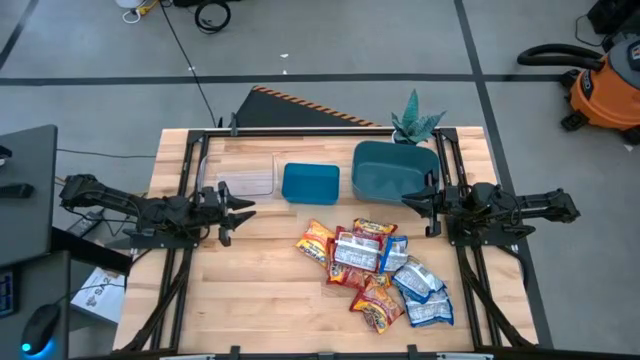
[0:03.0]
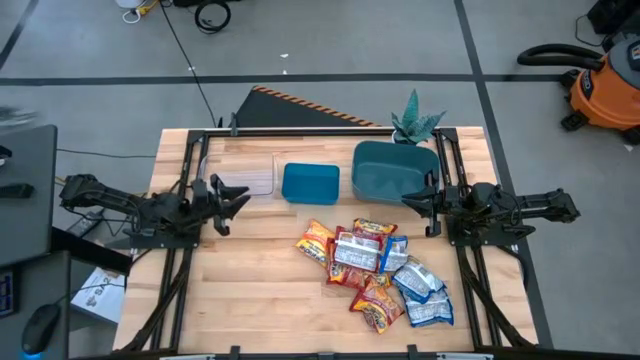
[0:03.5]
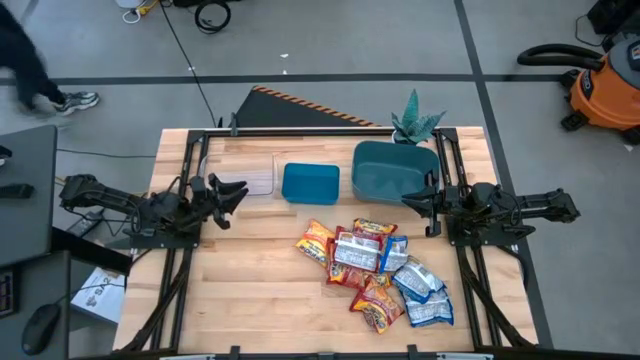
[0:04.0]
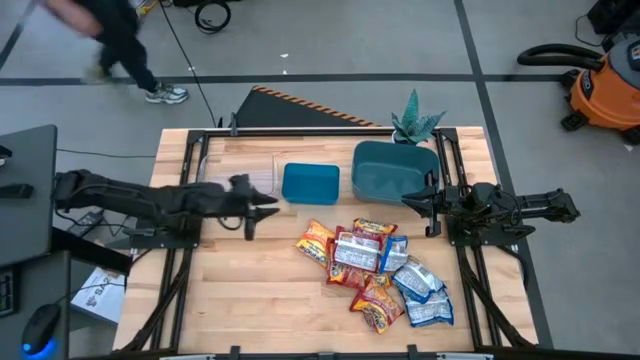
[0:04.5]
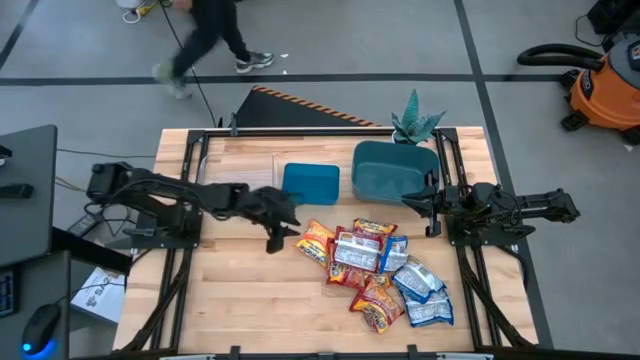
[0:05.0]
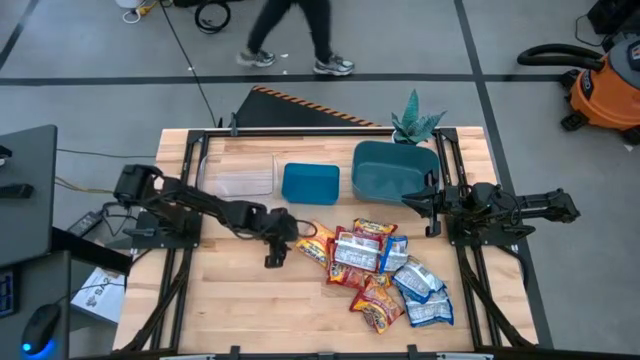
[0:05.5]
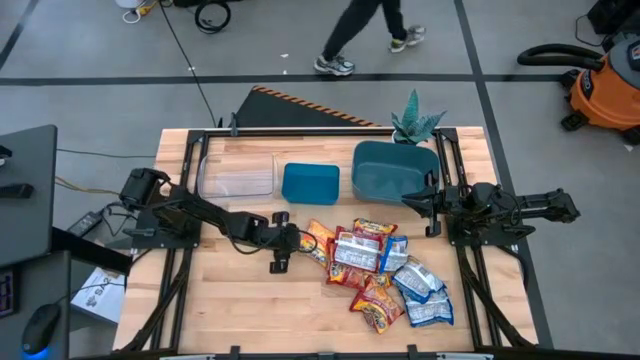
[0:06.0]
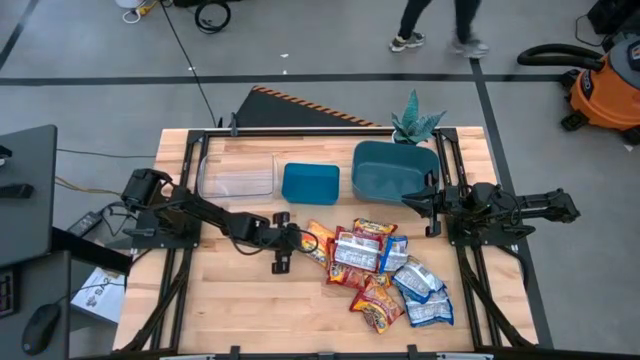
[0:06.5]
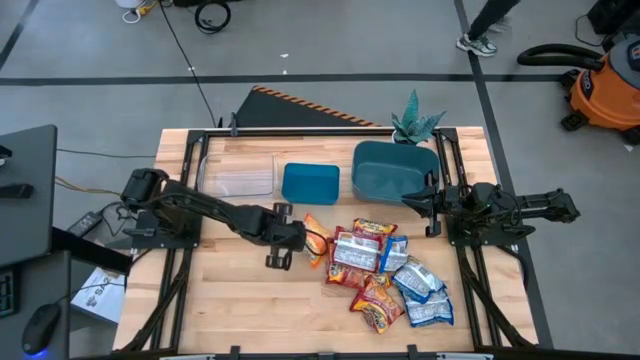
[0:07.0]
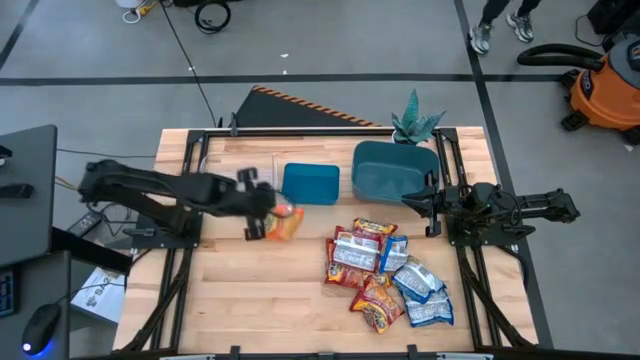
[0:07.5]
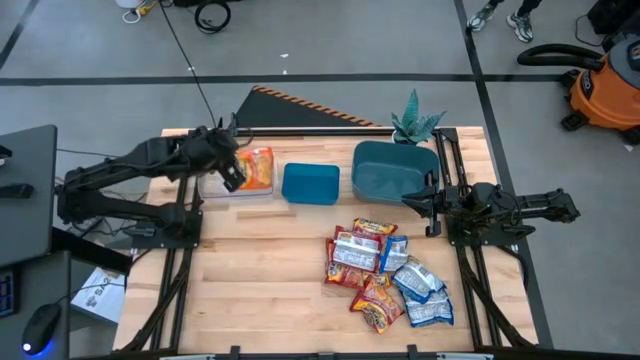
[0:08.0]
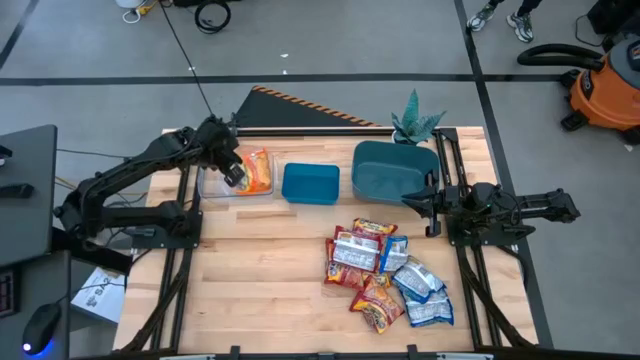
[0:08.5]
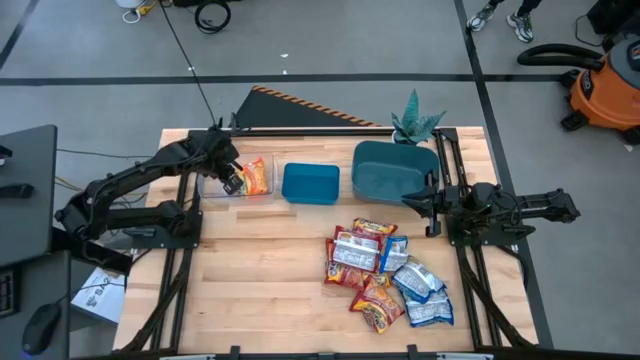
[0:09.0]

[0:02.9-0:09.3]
Task: Sort Maruchan noodles
Put the orange noodle pack into the transparent bin

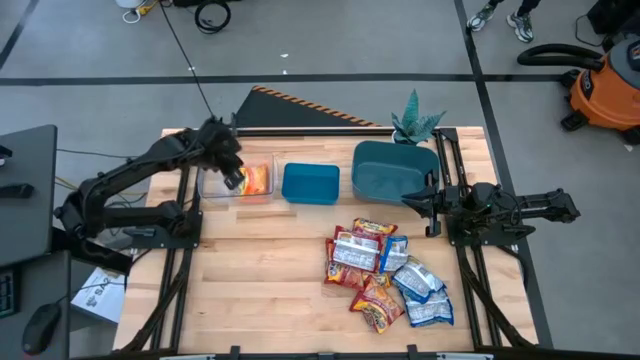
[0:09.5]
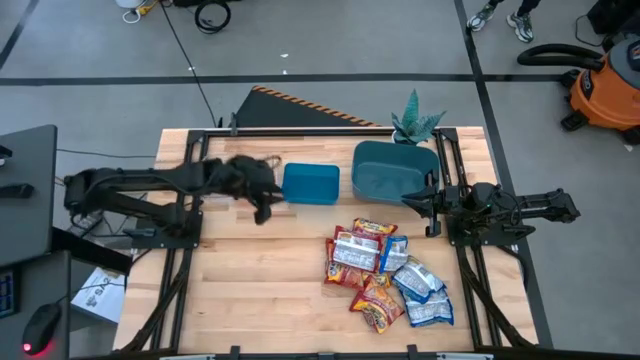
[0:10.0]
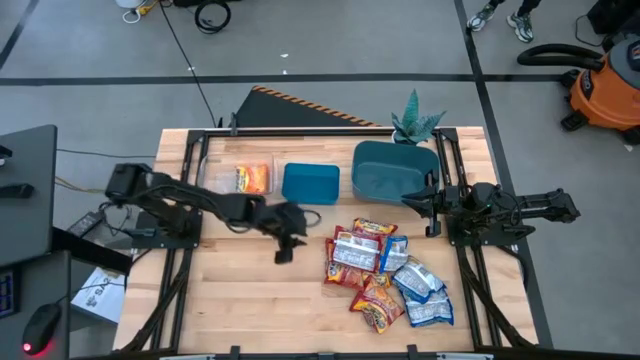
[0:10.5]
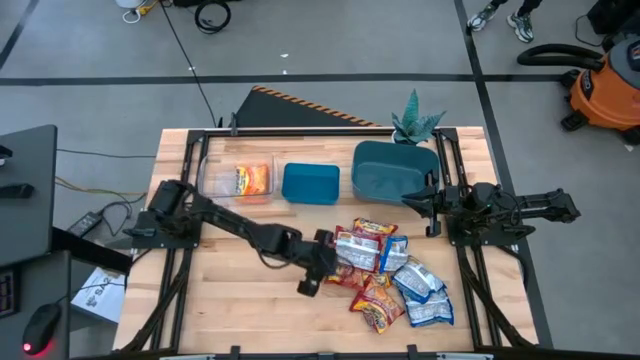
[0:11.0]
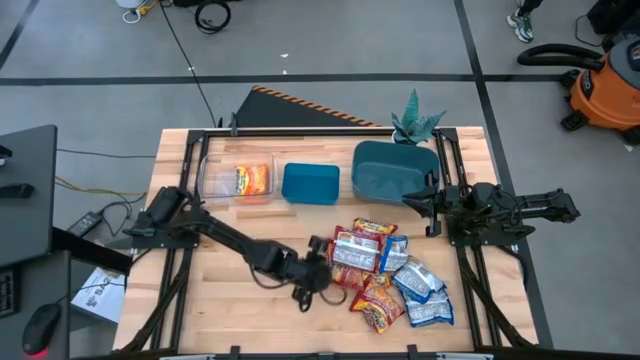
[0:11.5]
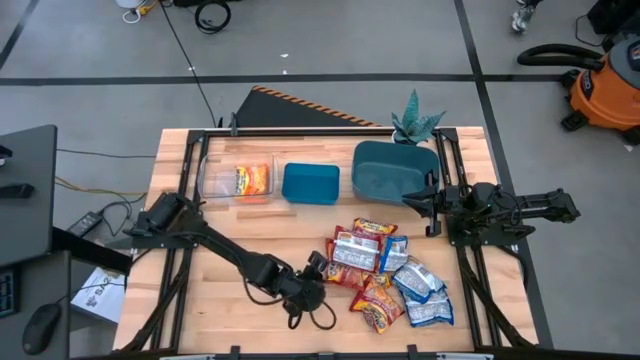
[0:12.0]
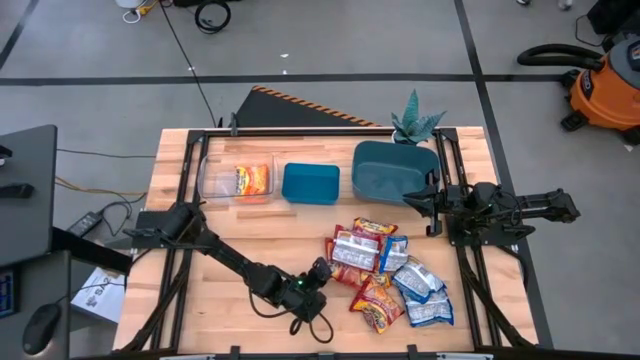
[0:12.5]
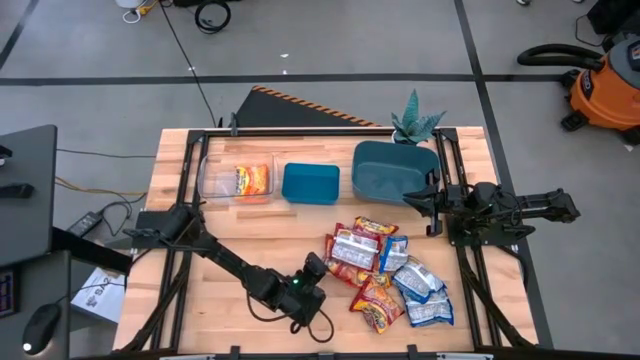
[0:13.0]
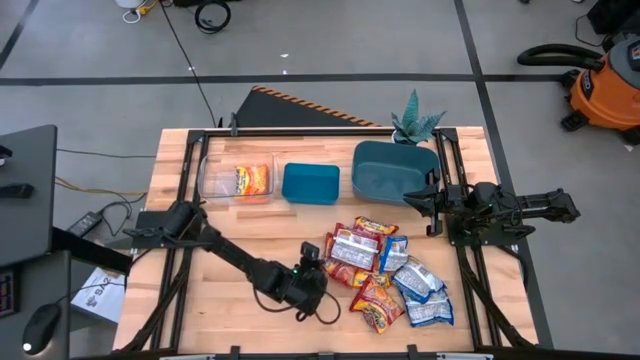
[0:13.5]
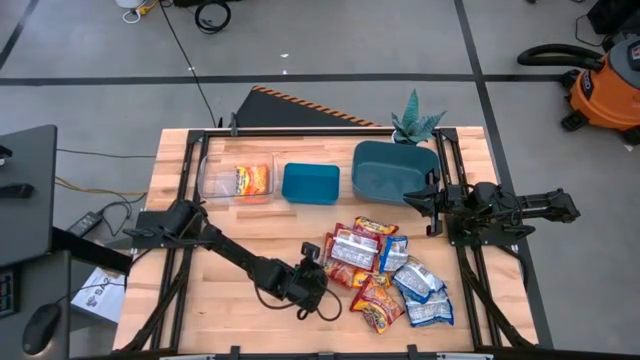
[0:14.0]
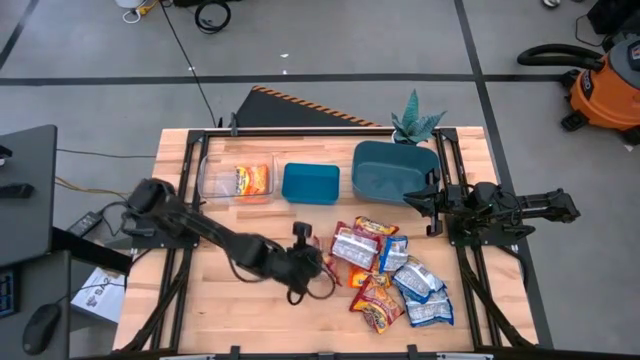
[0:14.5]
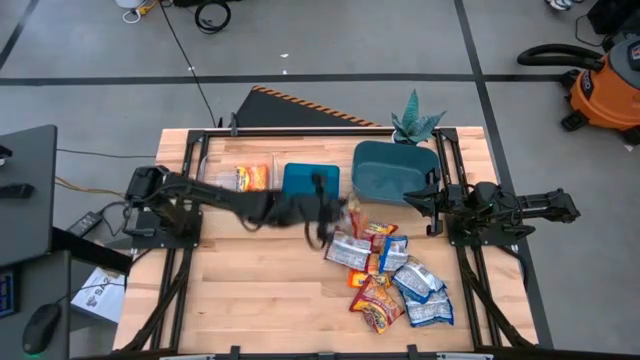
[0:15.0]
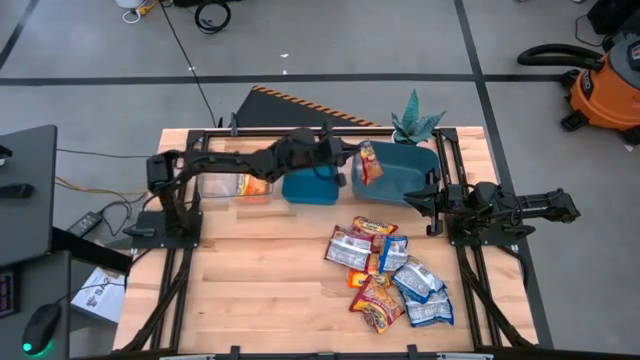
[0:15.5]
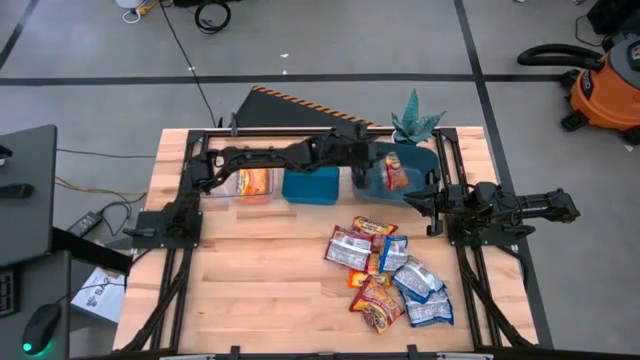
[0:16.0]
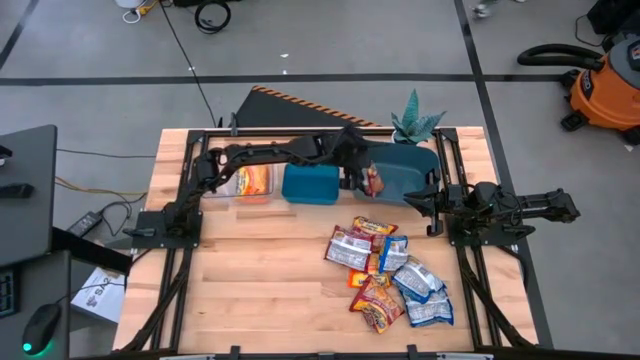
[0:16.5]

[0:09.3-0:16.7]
Put the red noodle pack into the dark blue bin

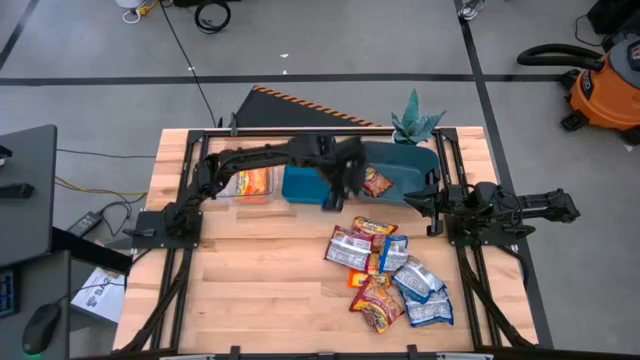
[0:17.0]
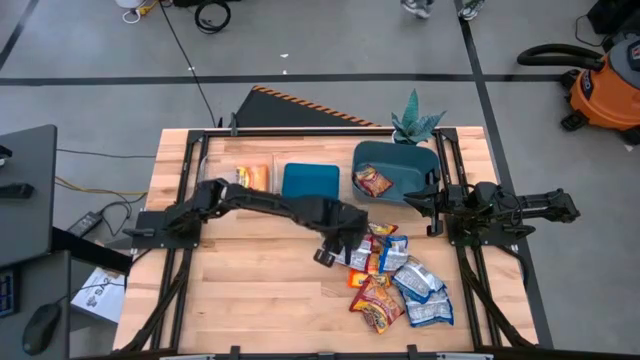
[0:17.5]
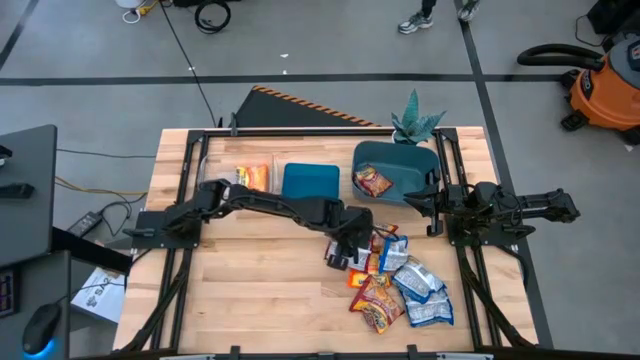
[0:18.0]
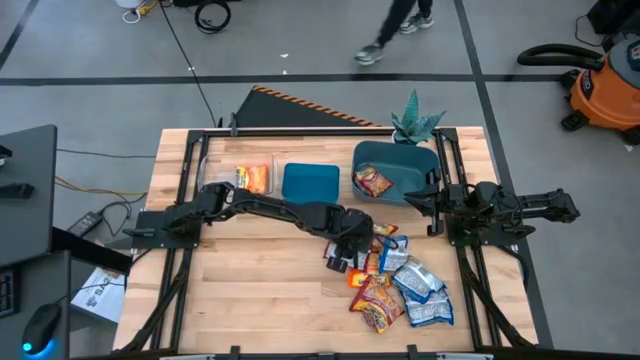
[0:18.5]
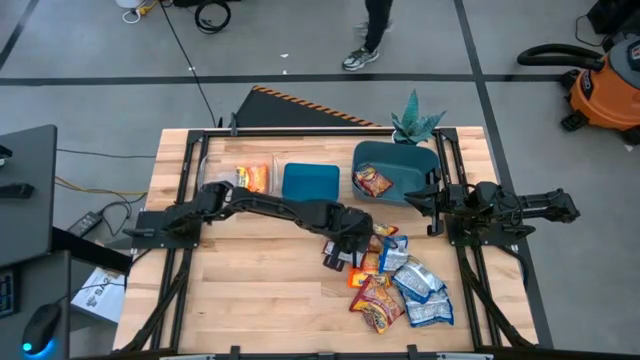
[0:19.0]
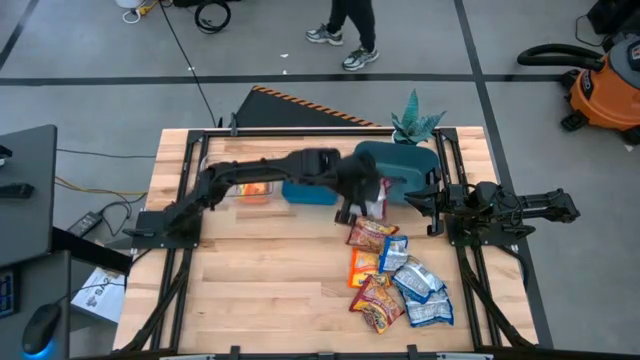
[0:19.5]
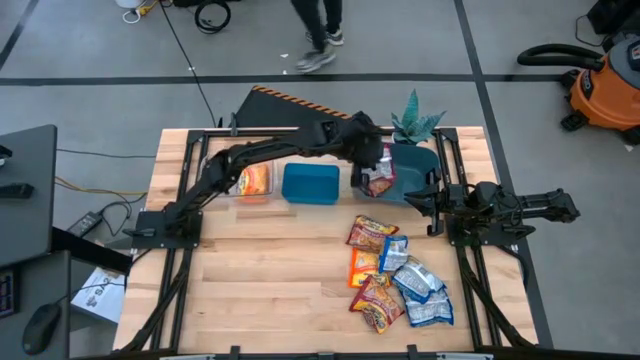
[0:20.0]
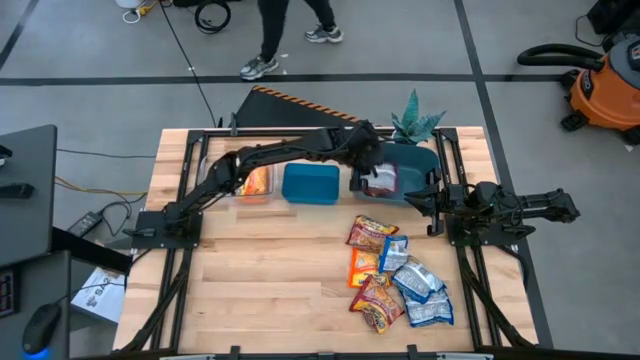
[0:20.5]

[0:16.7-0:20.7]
Put the red noodle pack into the dark blue bin

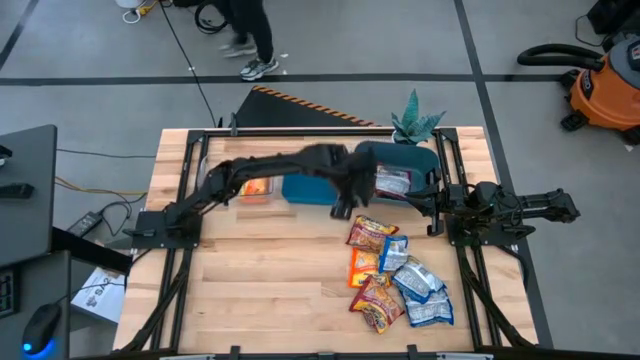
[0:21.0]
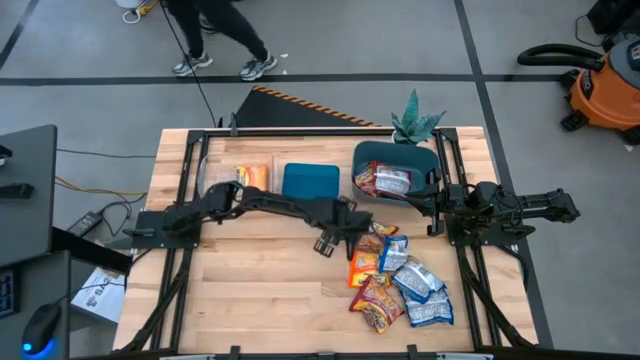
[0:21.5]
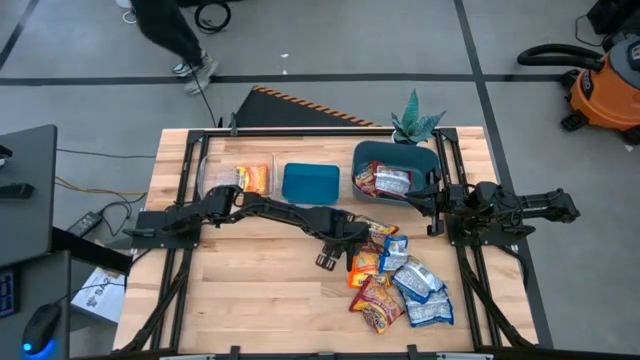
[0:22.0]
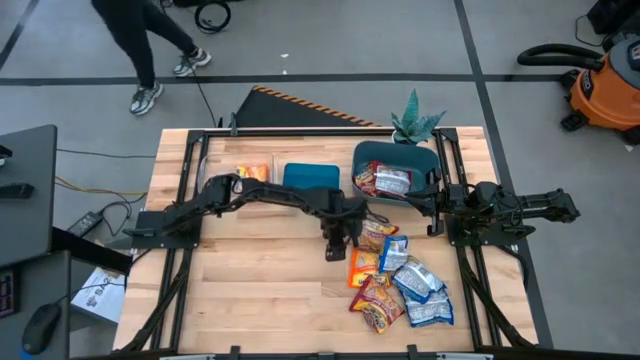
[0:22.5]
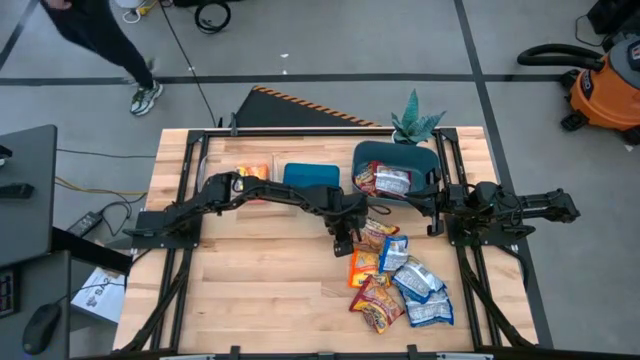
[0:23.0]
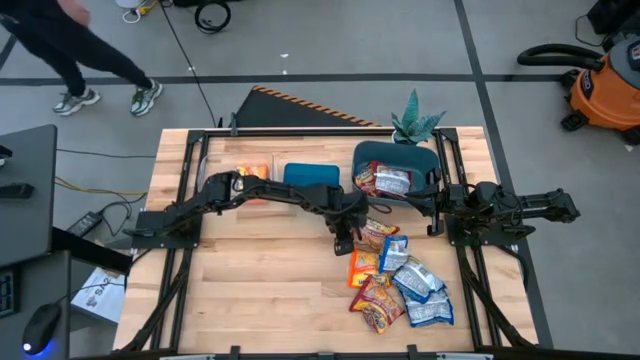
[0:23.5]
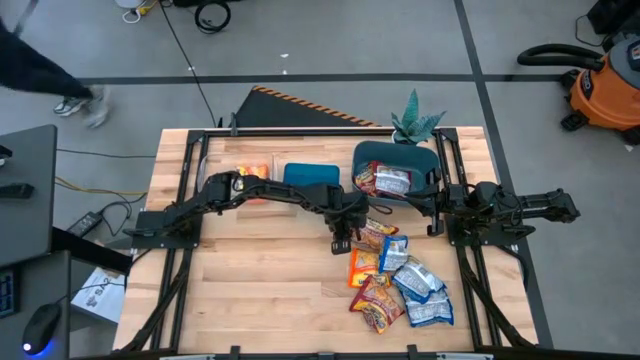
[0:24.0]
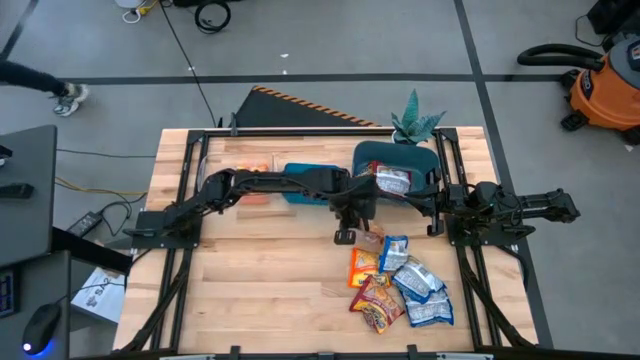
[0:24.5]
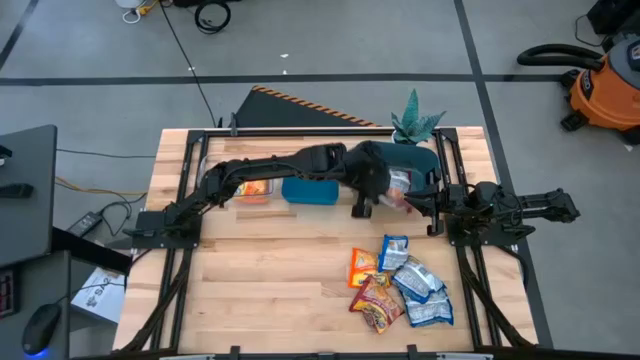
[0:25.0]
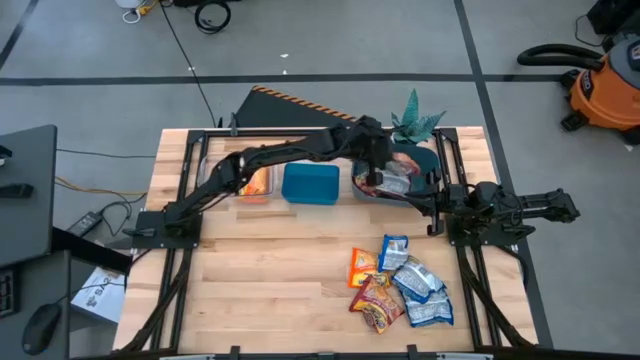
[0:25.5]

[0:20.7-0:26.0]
Put the red noodle pack into the dark blue bin
